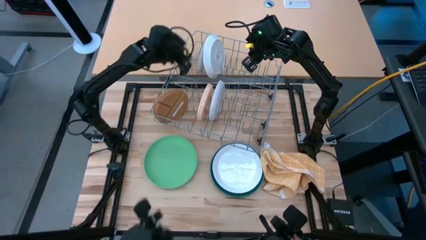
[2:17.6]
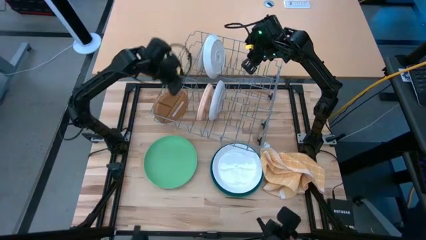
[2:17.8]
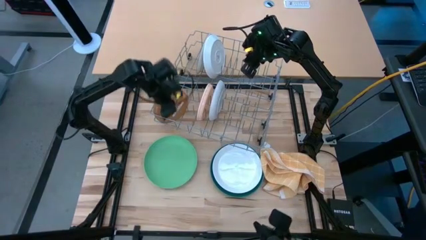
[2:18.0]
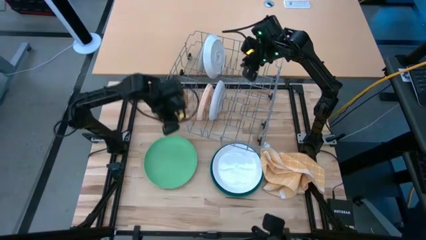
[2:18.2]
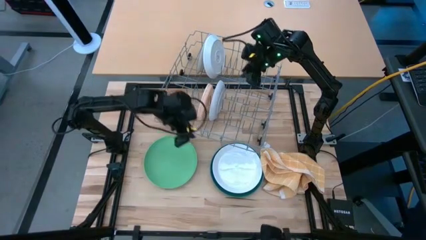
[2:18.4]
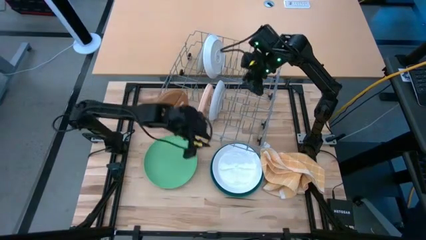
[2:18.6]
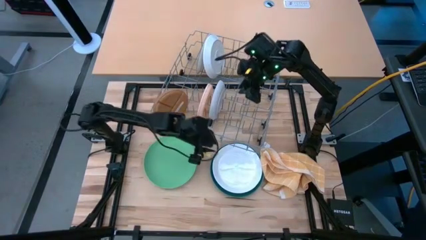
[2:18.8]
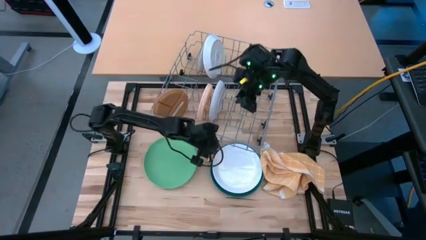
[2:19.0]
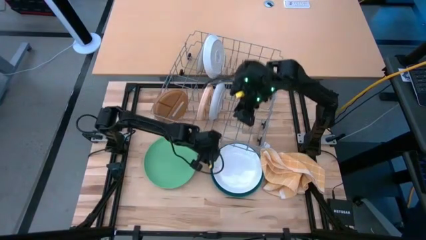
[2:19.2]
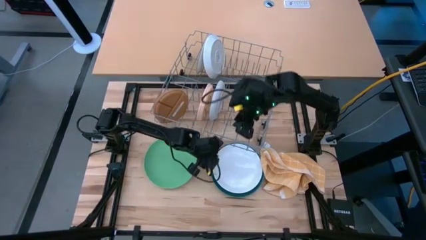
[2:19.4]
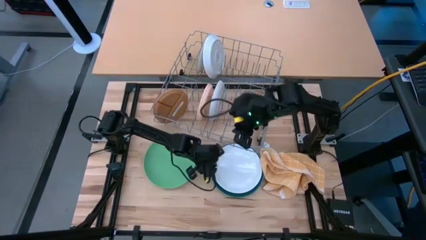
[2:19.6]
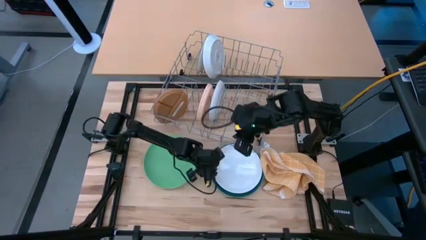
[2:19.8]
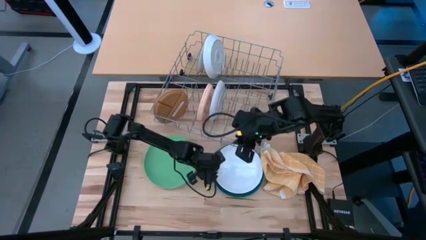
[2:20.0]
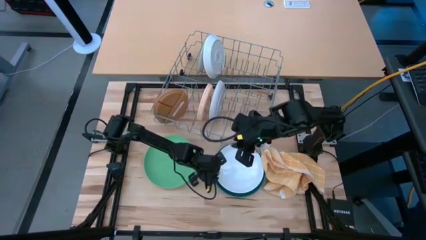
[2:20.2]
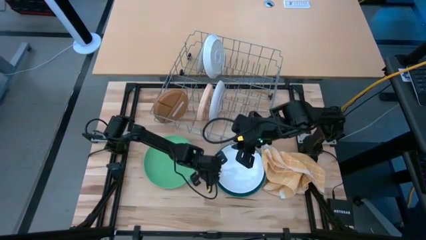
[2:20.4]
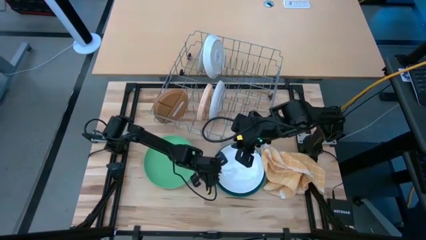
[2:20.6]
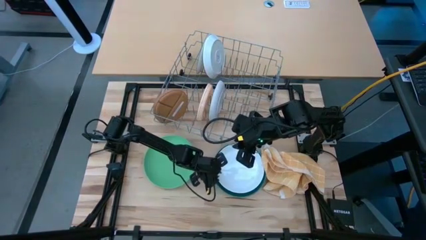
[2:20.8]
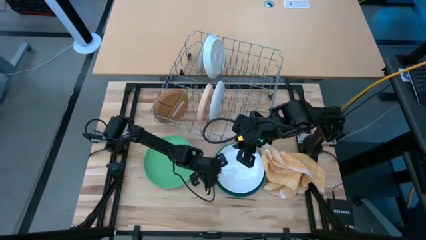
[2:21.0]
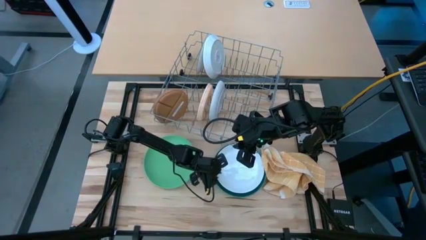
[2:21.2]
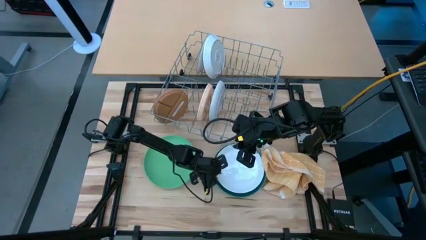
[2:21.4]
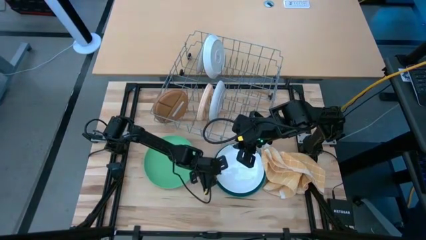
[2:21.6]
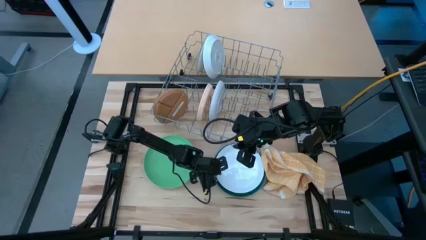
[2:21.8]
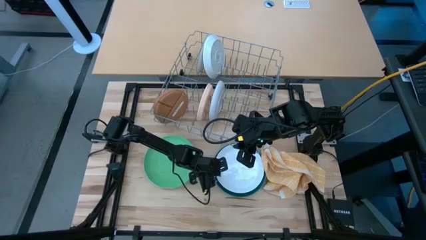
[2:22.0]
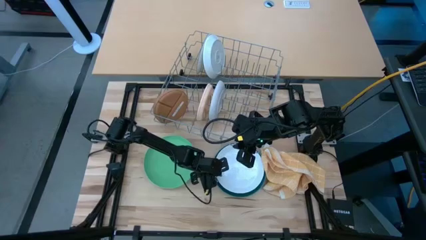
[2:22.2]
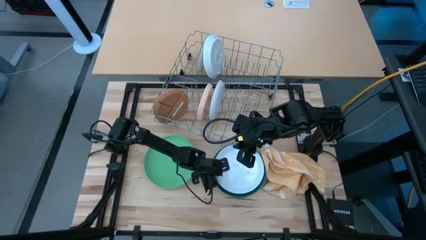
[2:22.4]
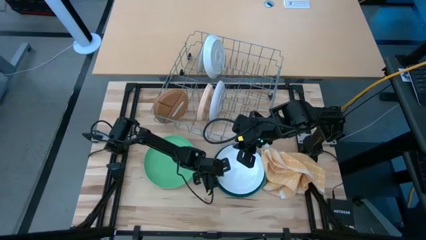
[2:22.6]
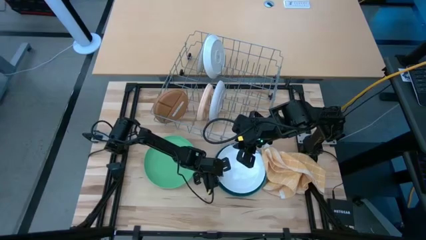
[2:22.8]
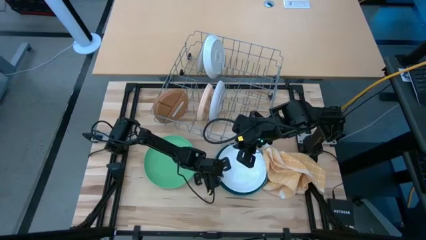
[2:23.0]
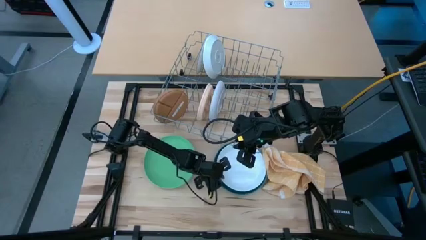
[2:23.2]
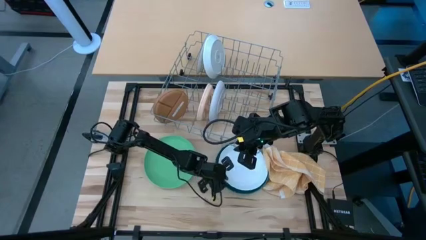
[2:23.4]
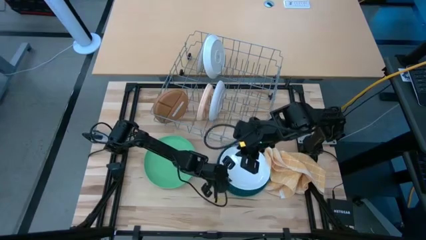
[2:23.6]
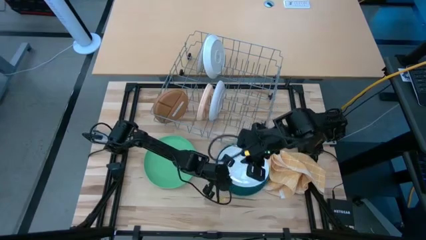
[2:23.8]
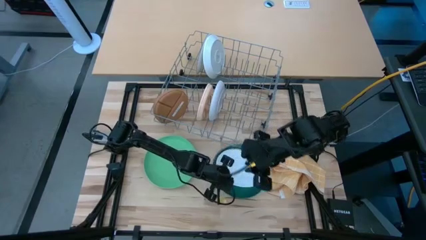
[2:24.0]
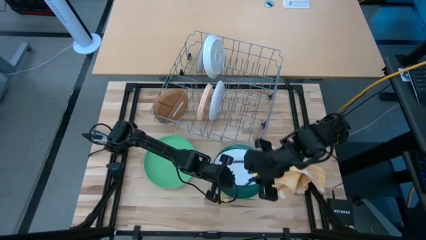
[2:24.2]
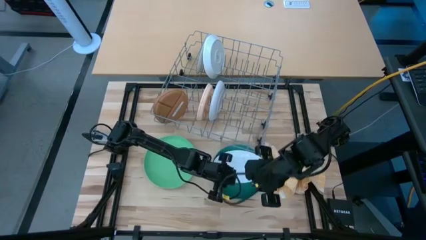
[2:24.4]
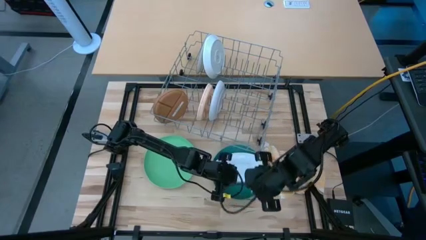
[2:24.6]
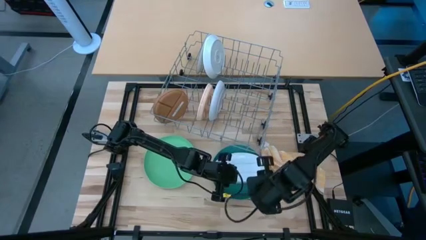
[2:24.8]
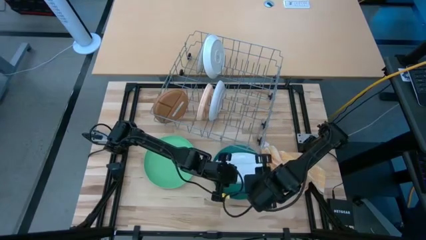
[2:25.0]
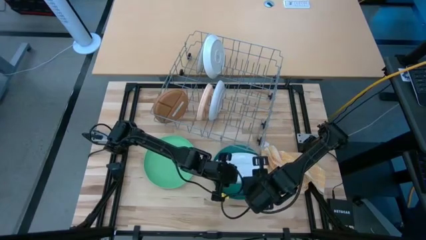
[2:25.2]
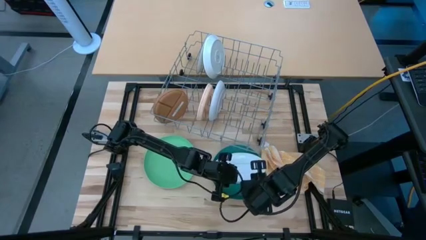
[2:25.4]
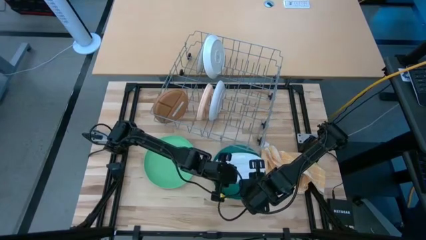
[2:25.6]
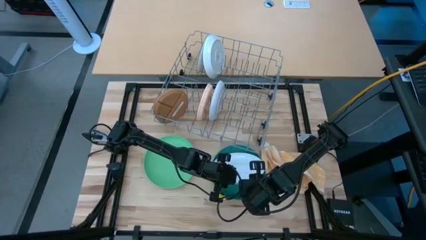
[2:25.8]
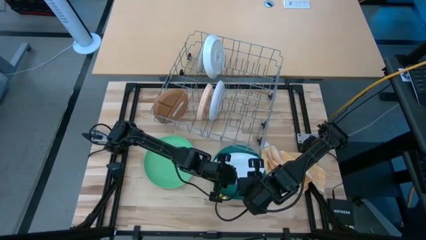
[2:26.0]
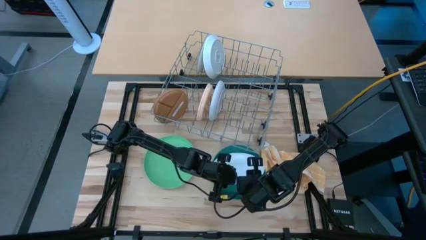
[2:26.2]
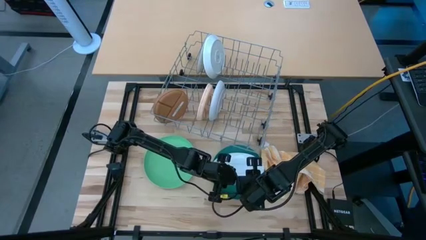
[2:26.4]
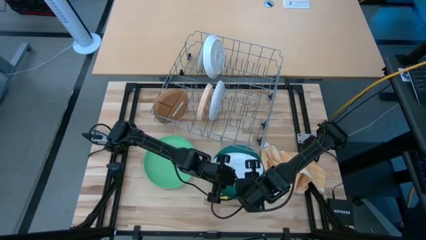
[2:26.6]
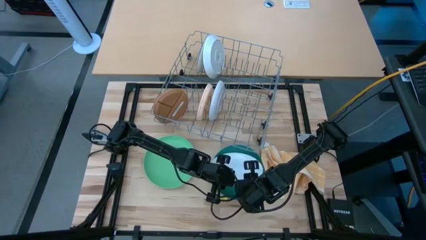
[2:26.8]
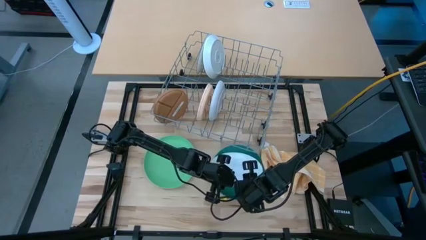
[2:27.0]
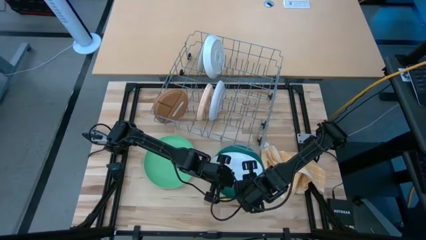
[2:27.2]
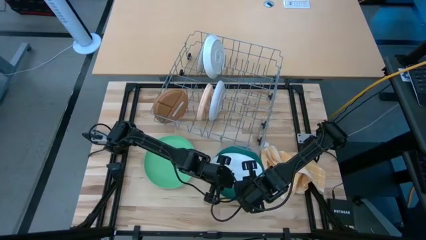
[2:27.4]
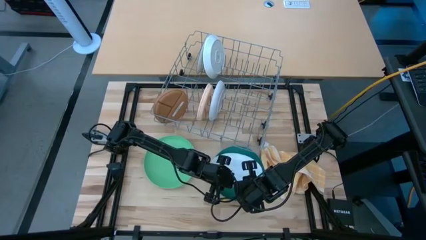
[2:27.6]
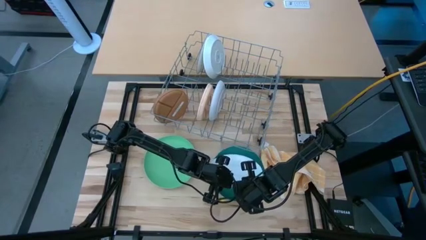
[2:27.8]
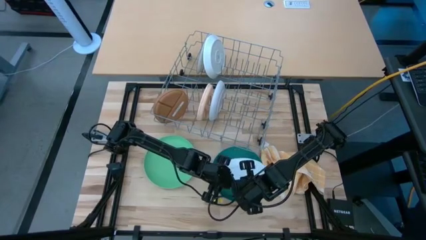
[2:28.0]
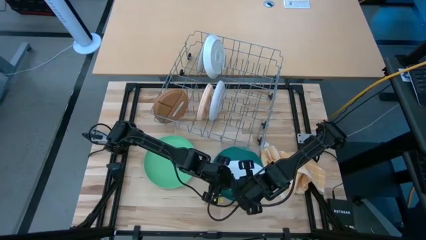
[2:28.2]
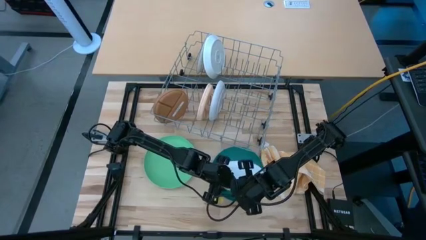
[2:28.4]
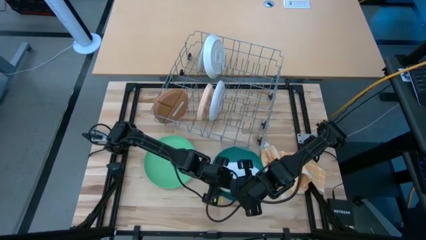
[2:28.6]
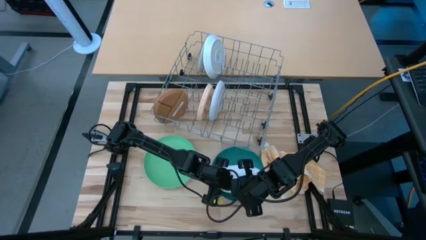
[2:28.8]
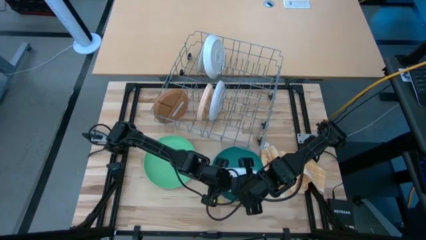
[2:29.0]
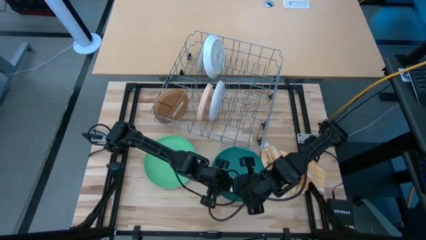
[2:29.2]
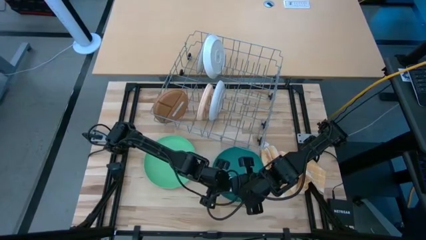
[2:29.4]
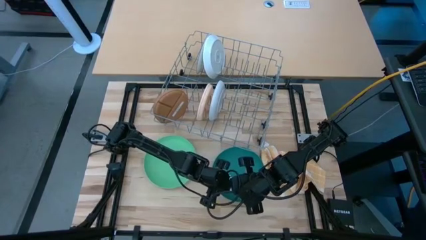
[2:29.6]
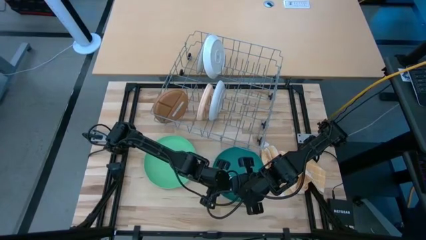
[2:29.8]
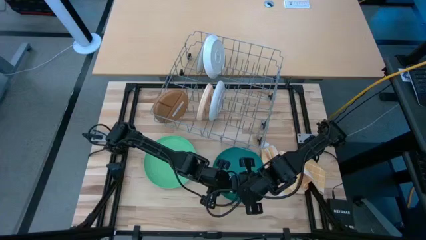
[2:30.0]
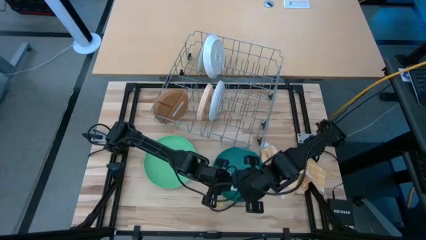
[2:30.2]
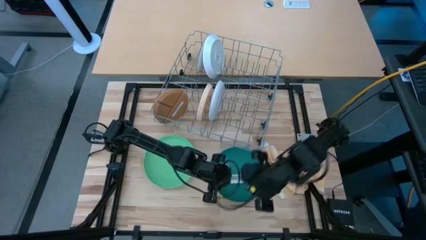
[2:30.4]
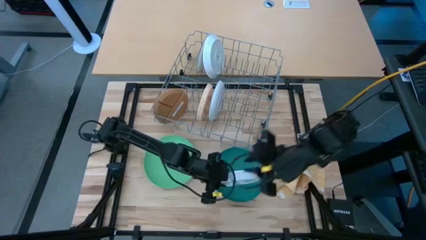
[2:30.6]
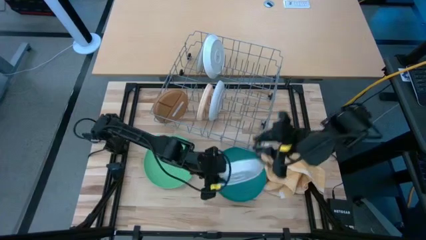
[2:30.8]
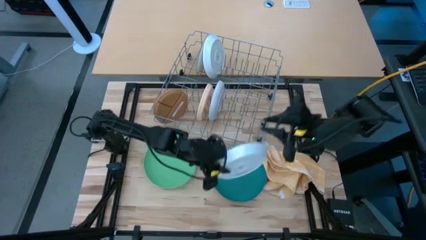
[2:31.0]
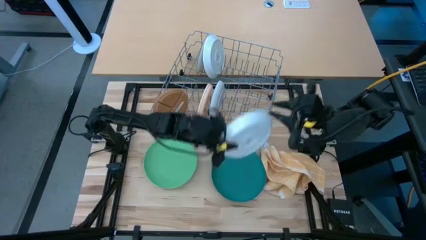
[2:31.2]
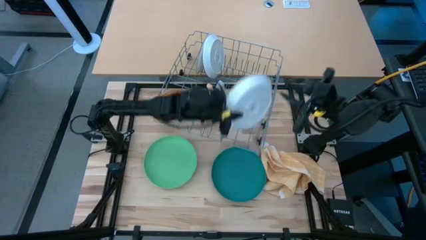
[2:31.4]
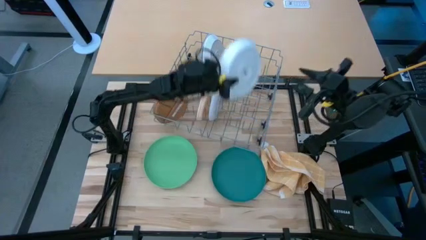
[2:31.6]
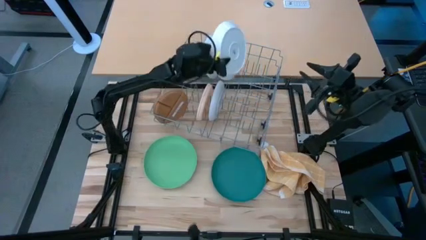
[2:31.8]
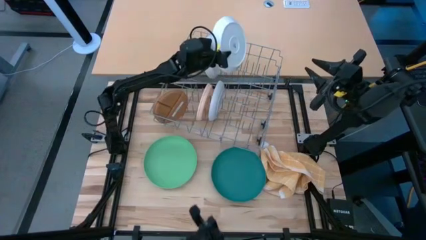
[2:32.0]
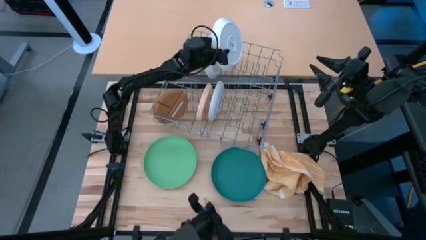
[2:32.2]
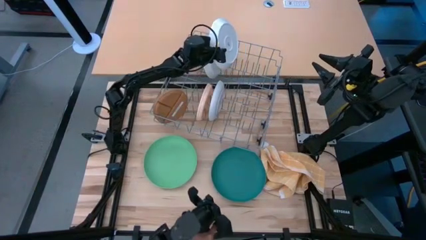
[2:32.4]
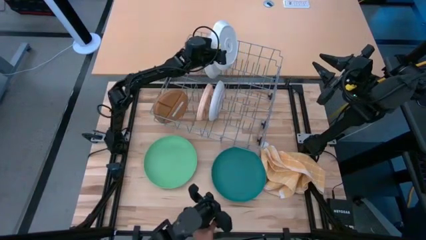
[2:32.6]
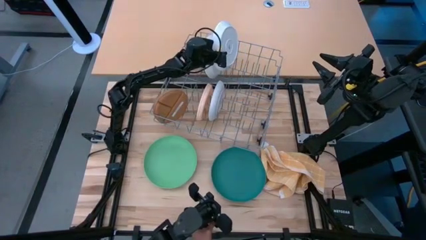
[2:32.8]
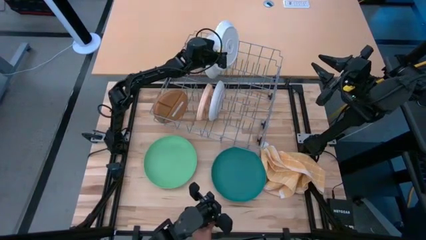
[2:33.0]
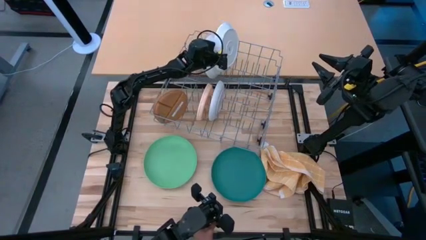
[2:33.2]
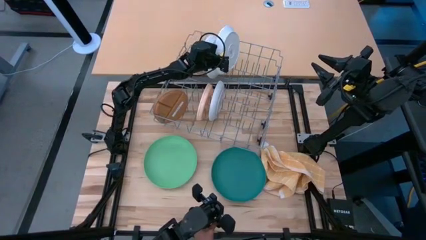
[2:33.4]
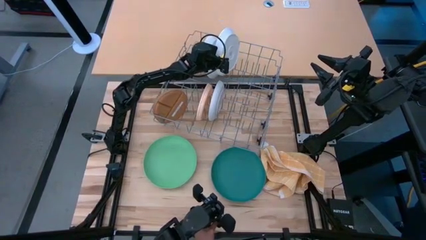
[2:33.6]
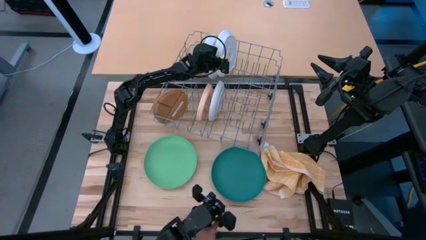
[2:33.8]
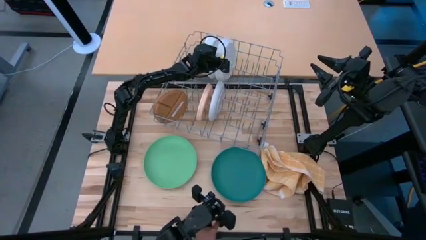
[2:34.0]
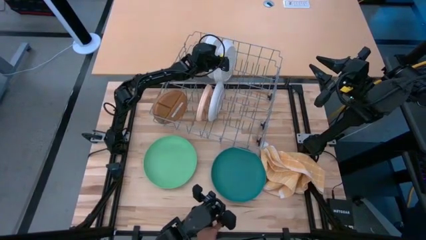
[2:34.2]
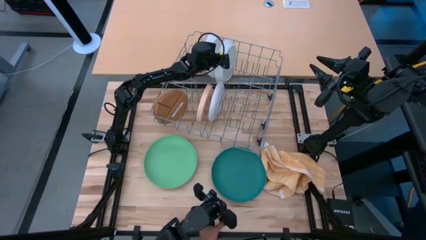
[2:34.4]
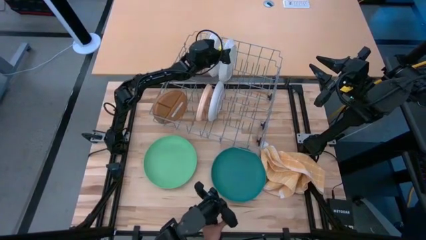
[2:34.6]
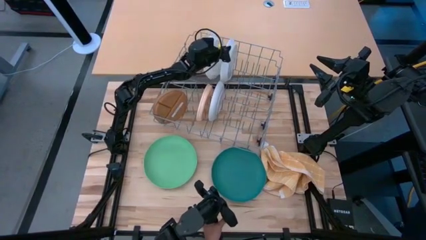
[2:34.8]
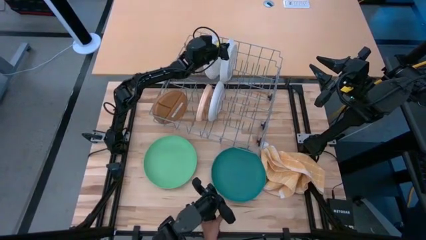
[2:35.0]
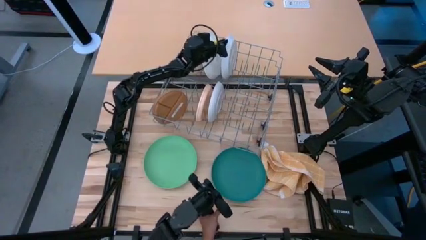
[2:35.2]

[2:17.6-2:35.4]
Task: Sort dishes
Put the white plate in the dish rack
